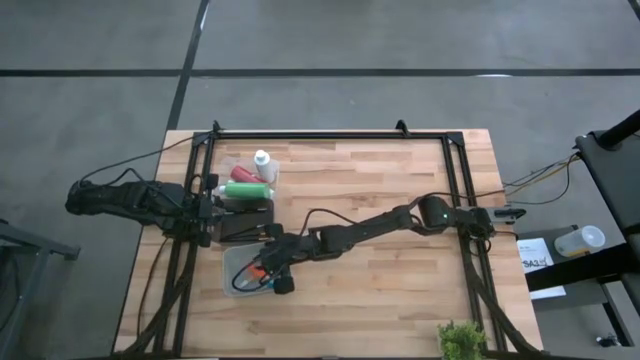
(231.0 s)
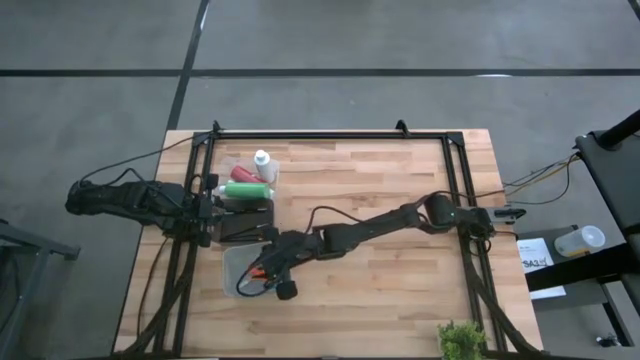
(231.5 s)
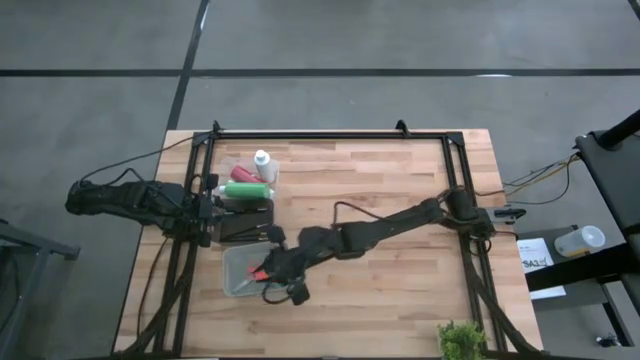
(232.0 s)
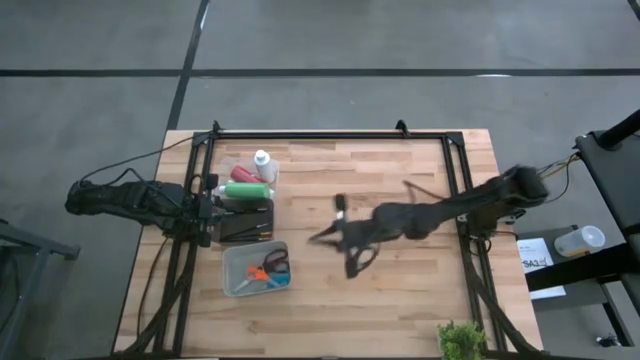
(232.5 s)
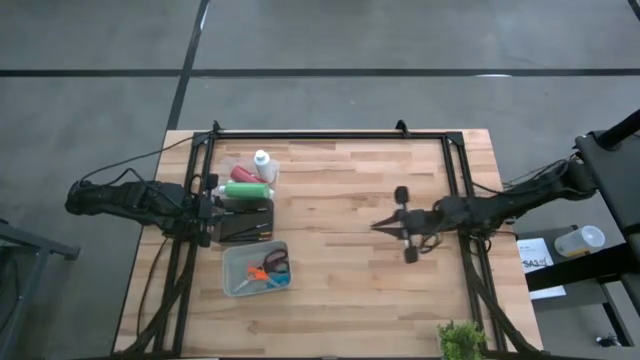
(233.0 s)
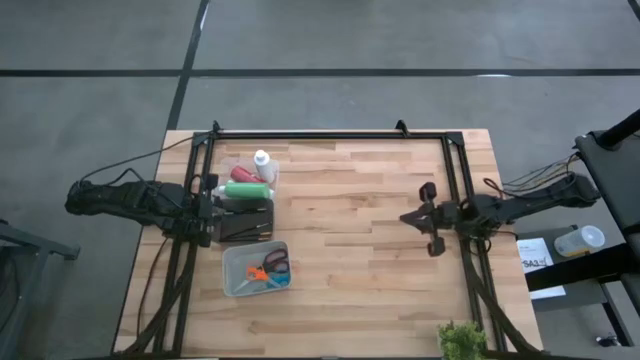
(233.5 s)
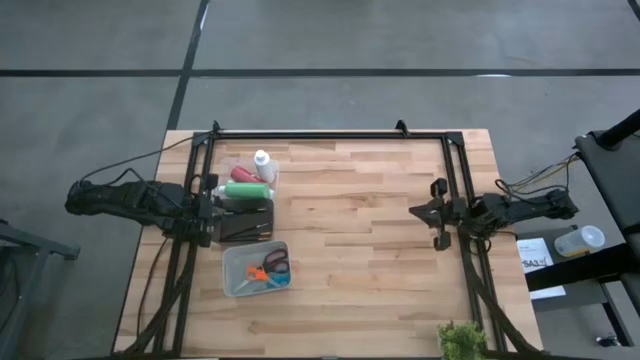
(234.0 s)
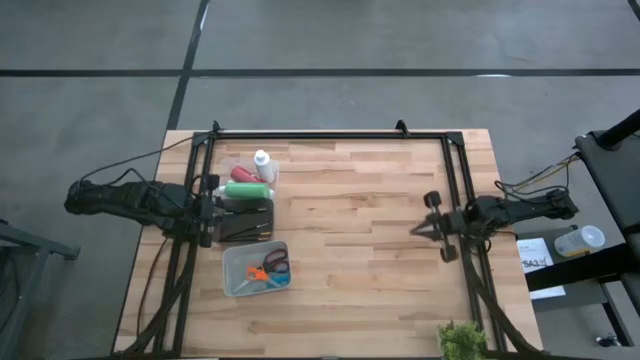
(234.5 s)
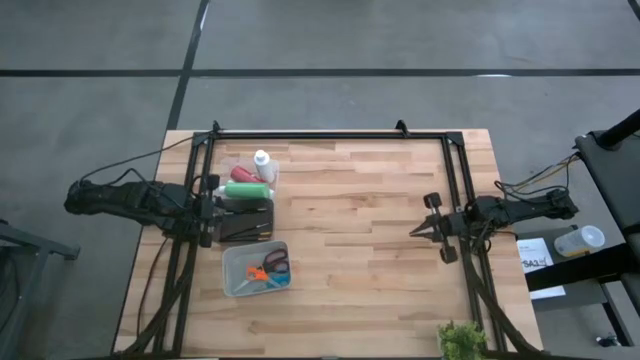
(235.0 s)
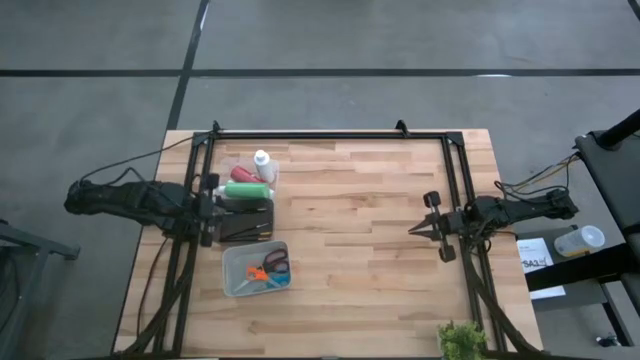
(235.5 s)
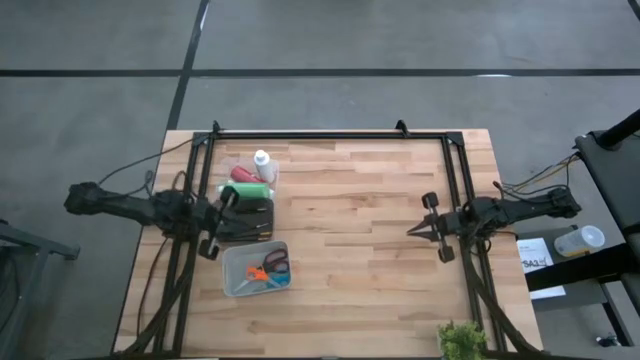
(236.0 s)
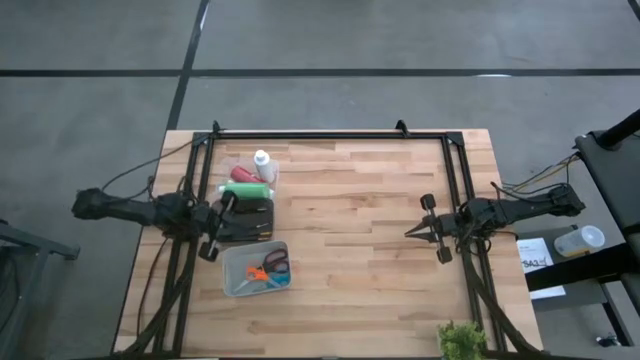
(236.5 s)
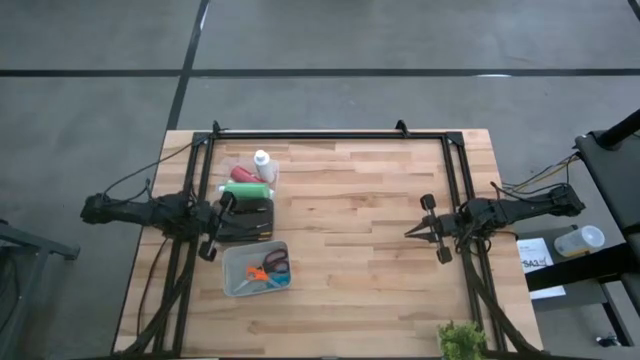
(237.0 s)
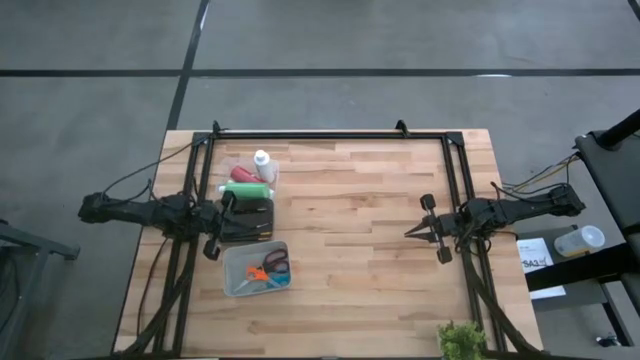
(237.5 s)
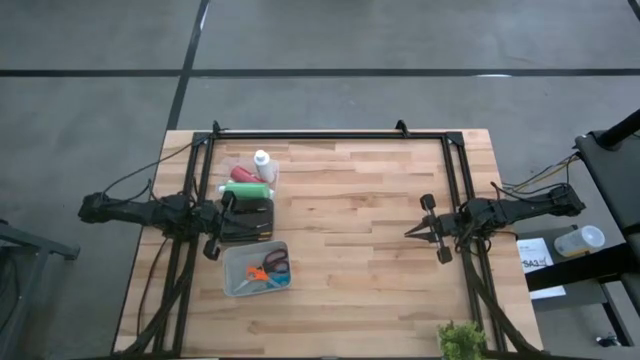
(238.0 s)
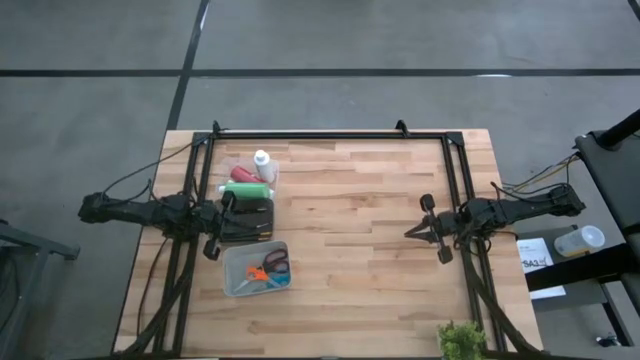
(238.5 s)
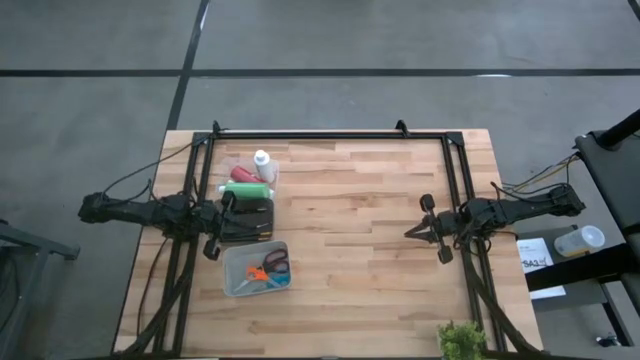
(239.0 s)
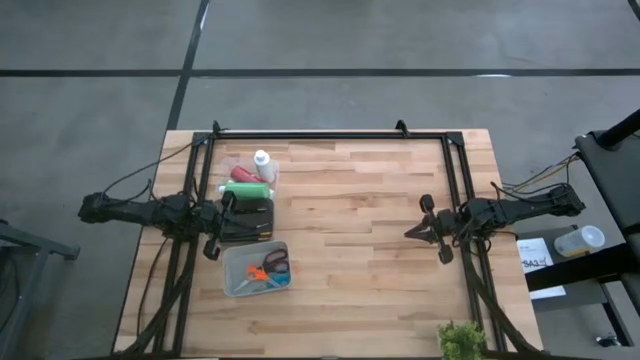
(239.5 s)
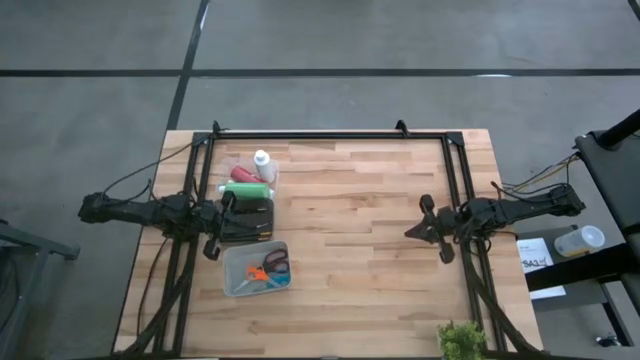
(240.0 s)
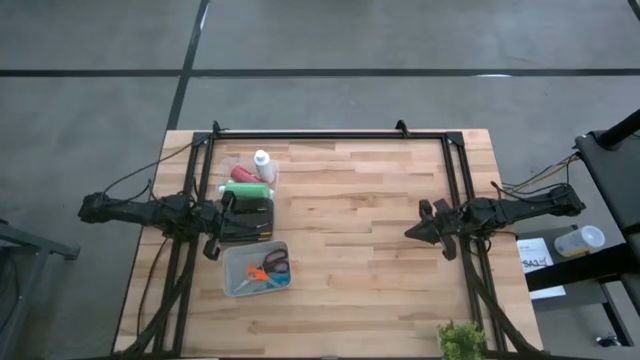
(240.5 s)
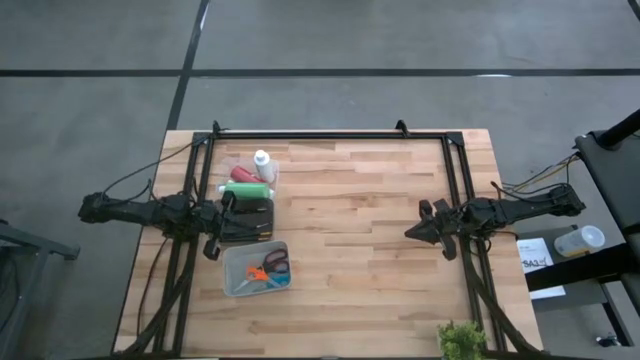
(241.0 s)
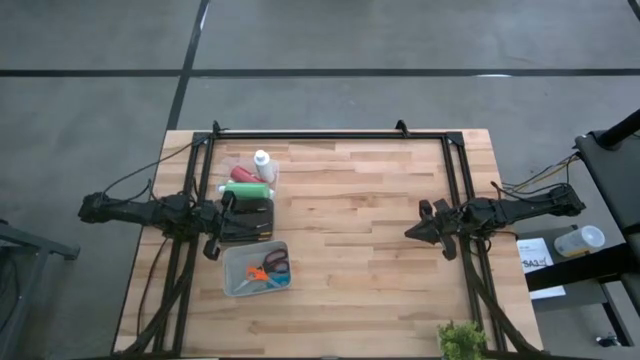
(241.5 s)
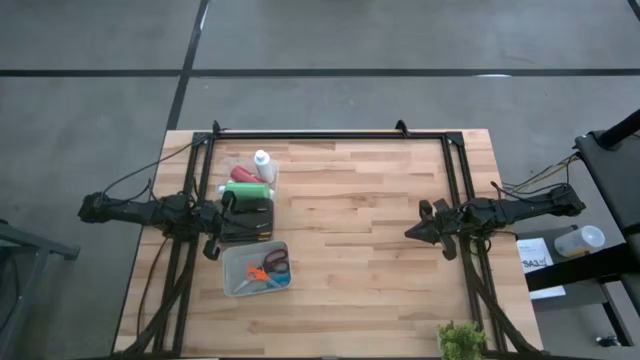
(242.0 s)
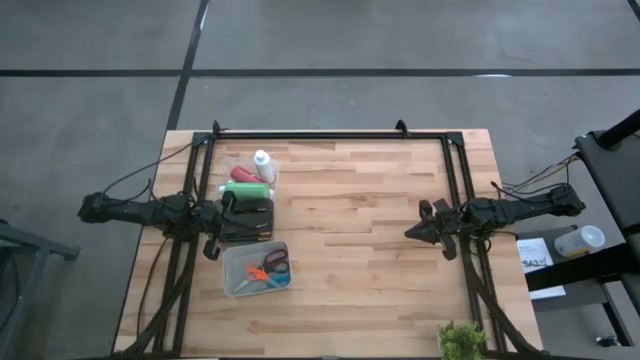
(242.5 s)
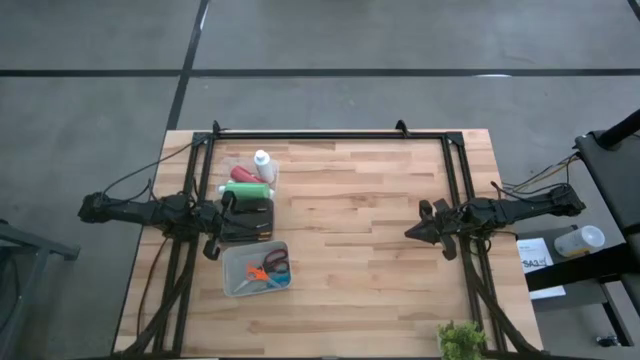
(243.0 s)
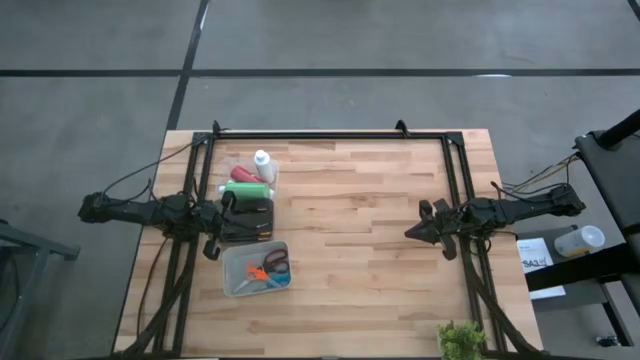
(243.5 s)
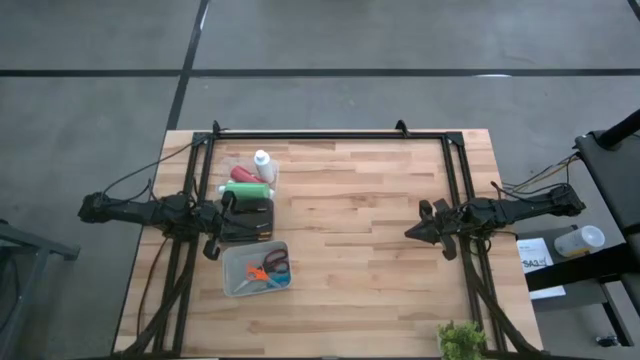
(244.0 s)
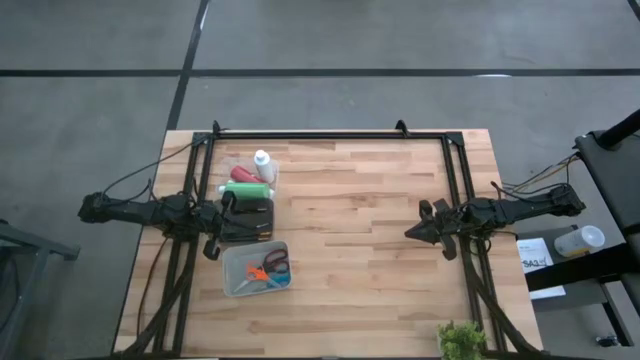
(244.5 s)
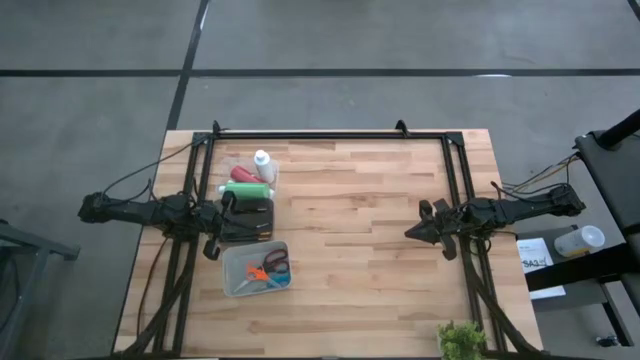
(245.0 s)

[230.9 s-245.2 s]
Task: Pick & Place Paint Supplies
Return to Home Position

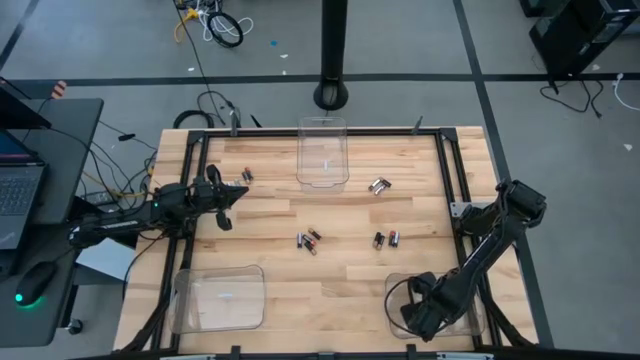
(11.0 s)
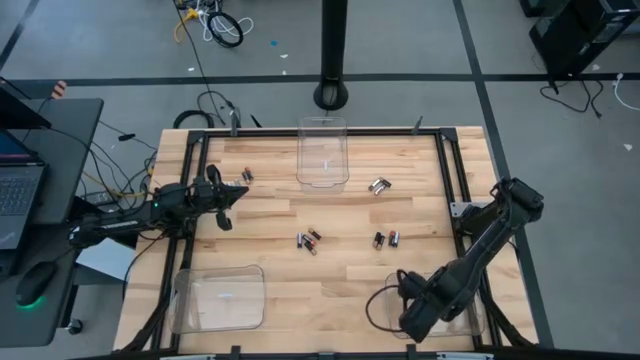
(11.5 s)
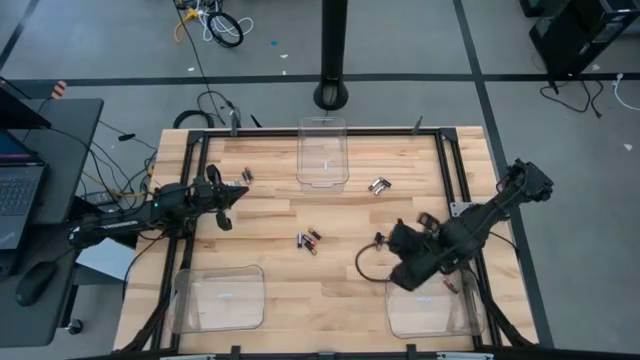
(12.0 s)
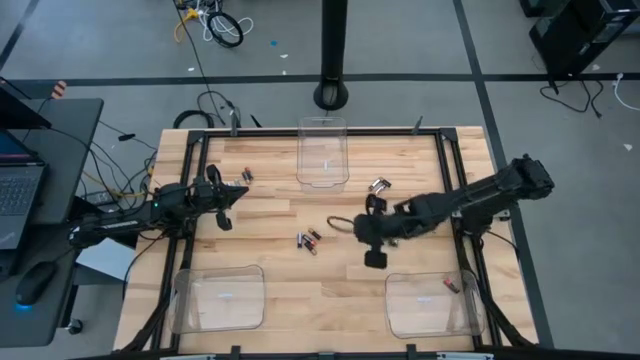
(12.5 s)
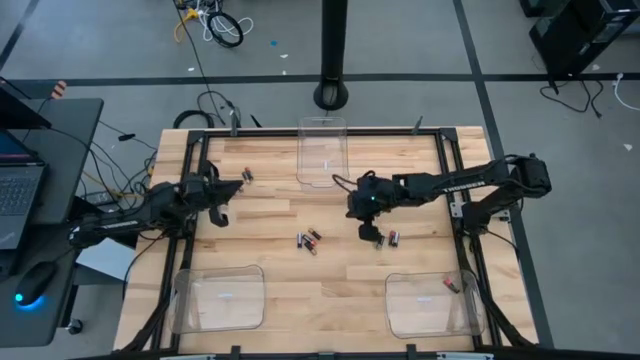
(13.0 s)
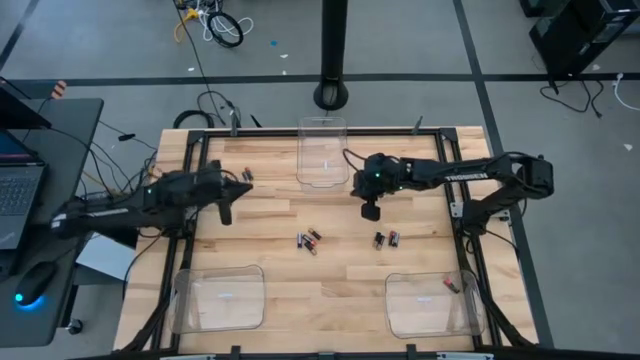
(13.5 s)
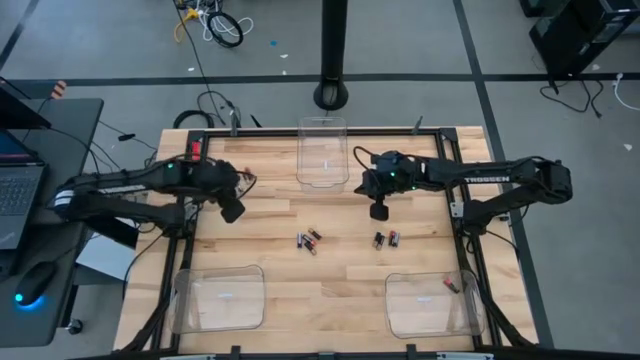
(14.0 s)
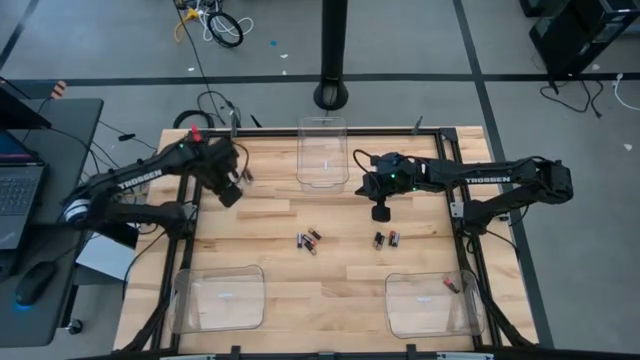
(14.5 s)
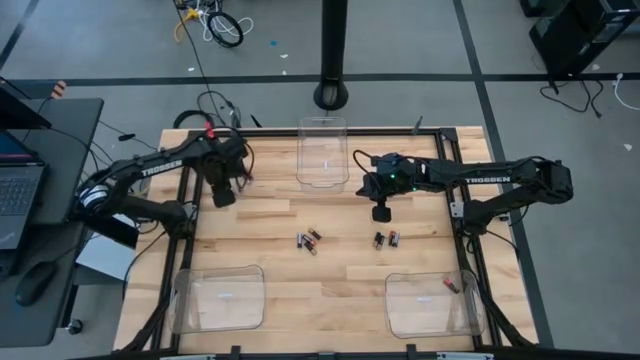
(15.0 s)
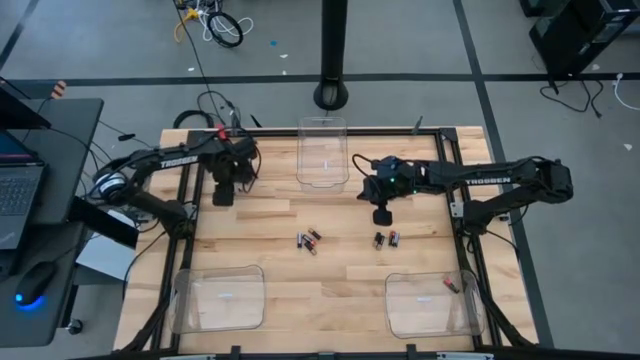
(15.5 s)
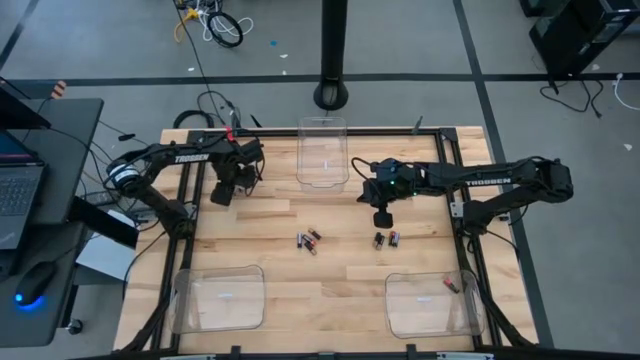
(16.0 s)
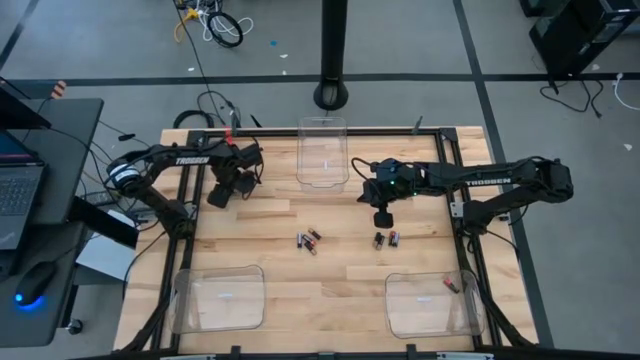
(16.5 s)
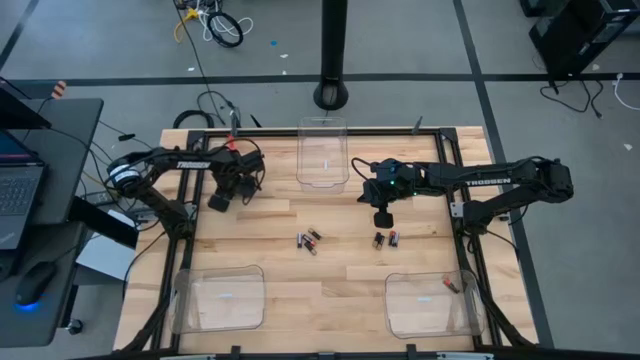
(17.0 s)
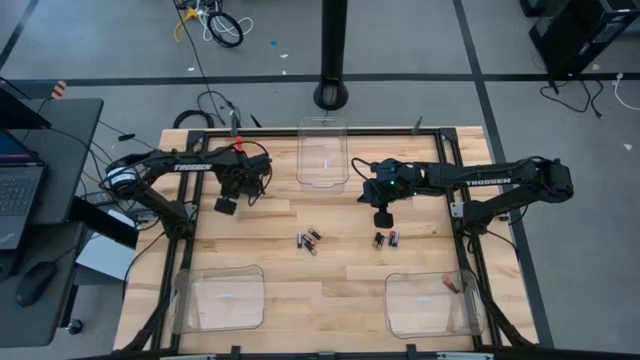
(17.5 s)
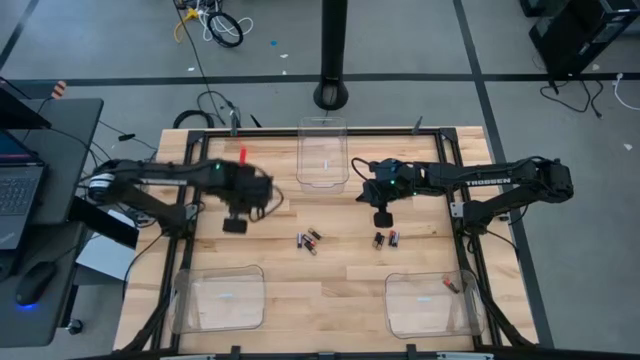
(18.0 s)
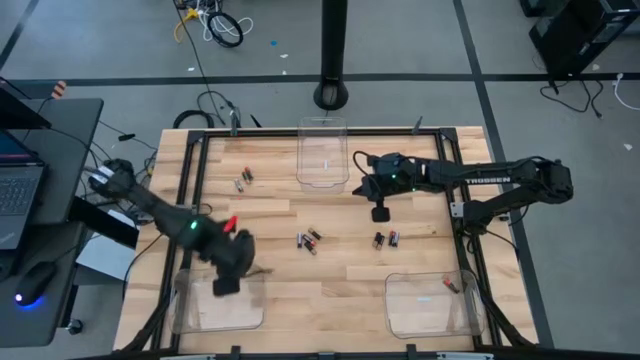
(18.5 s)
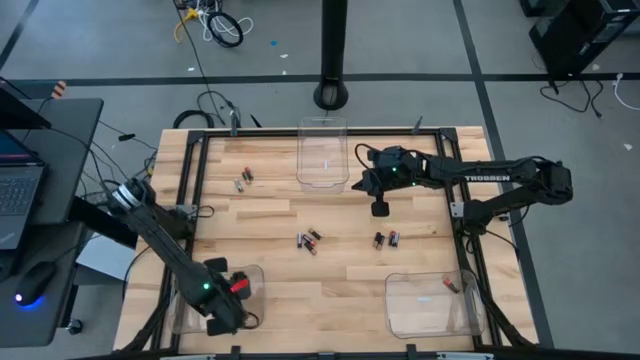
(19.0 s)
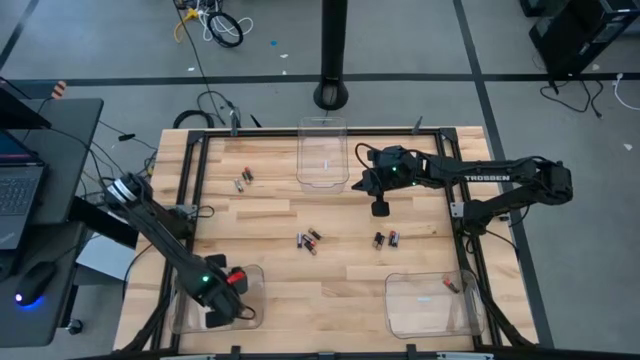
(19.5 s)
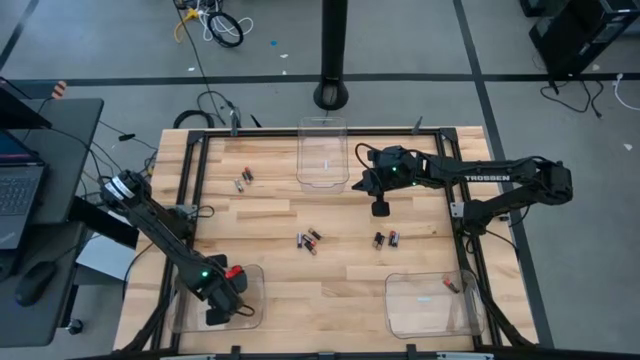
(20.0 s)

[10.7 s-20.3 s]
Task: Sort batteries
Put the silver battery into the bottom left transparent bin
